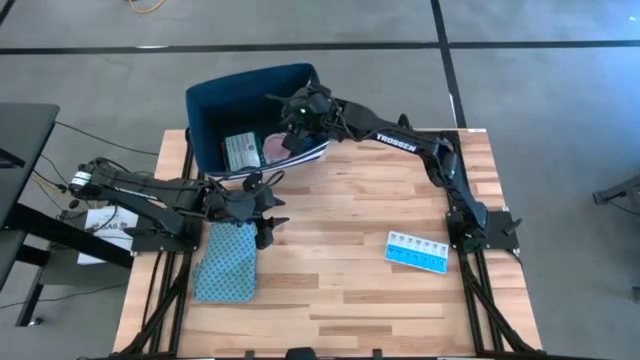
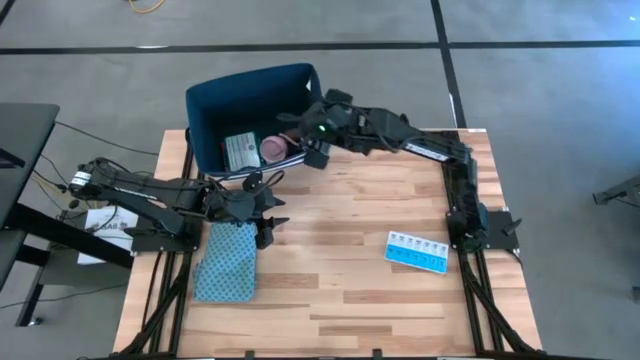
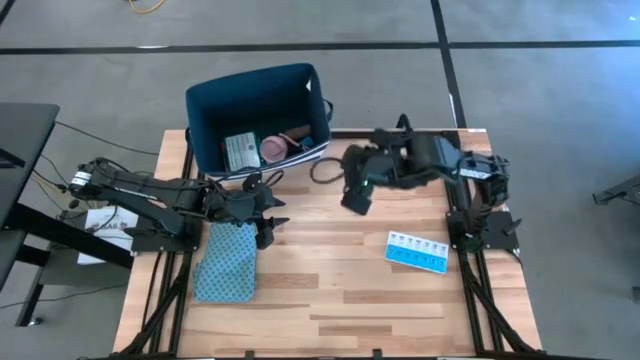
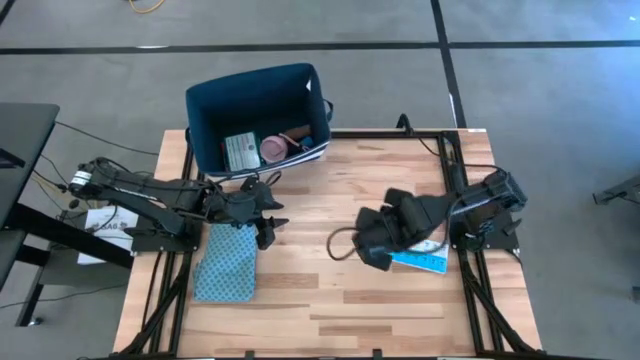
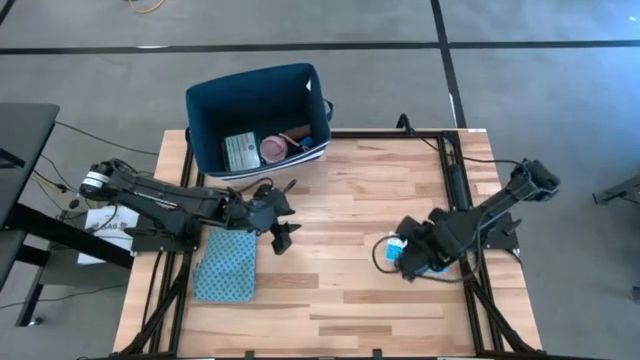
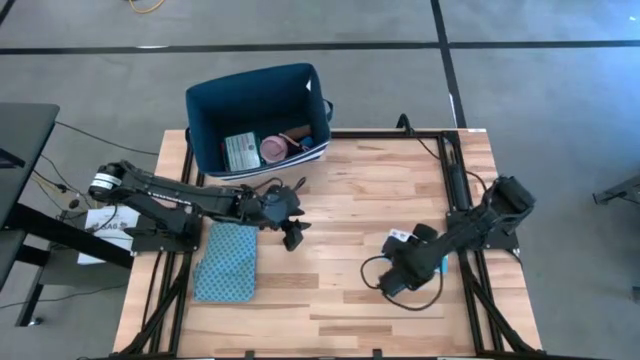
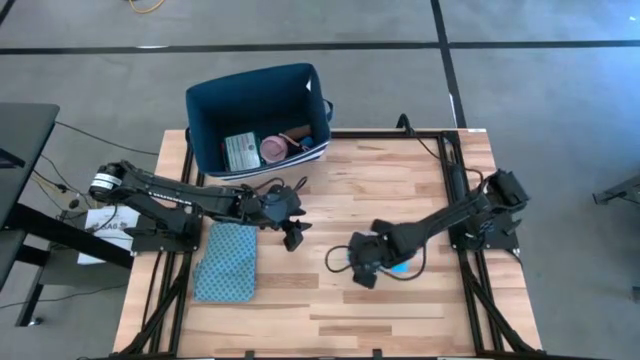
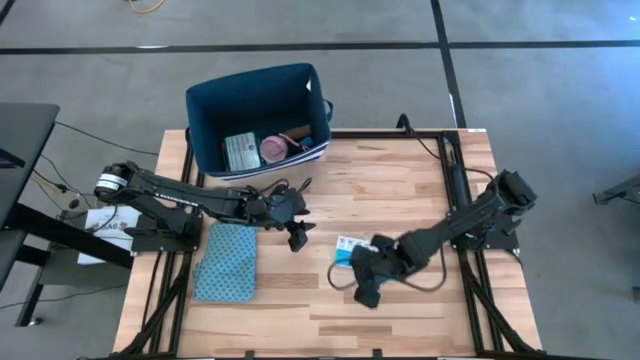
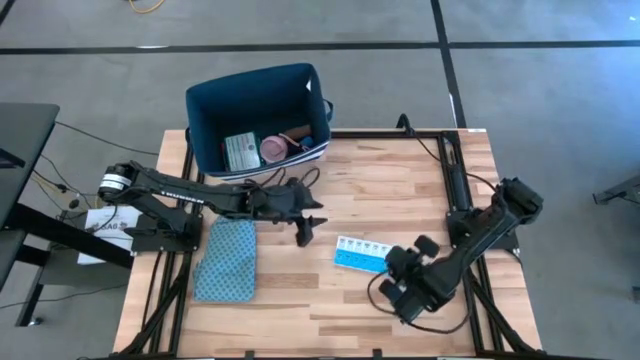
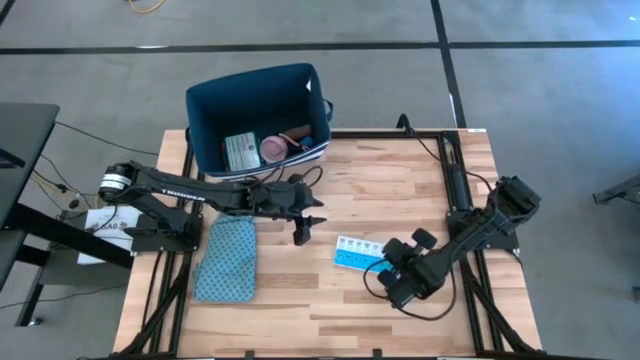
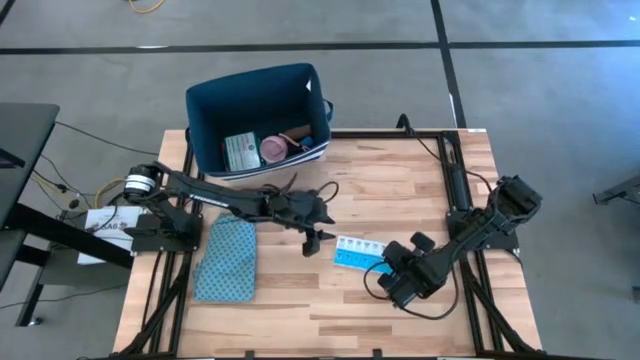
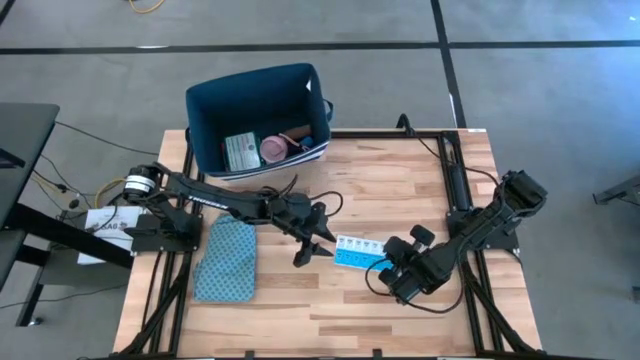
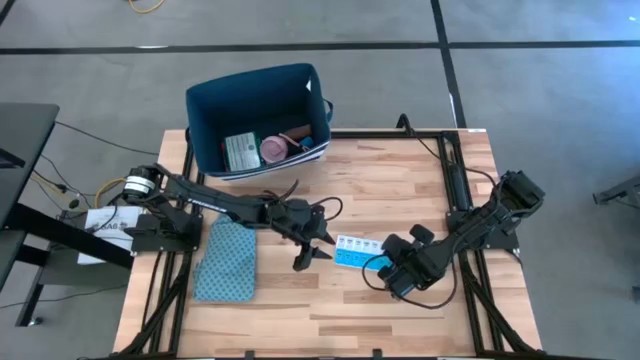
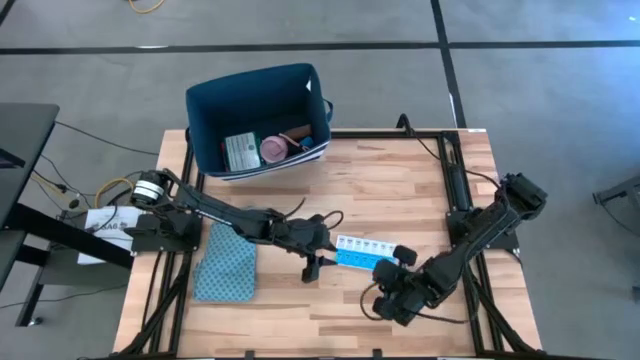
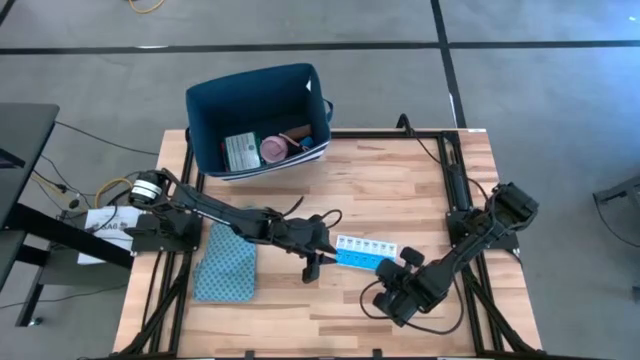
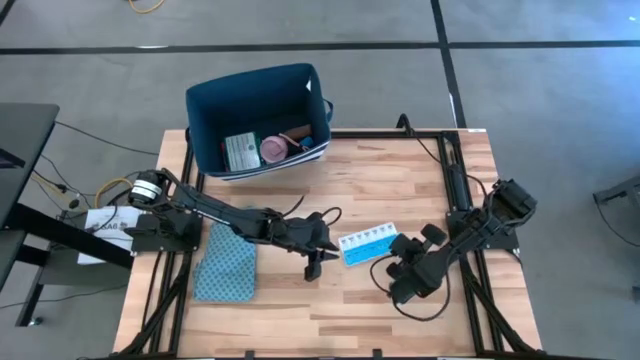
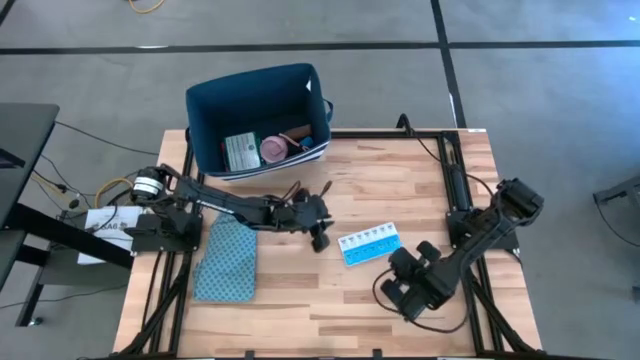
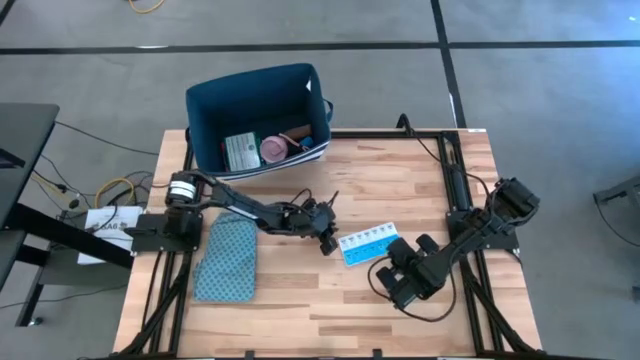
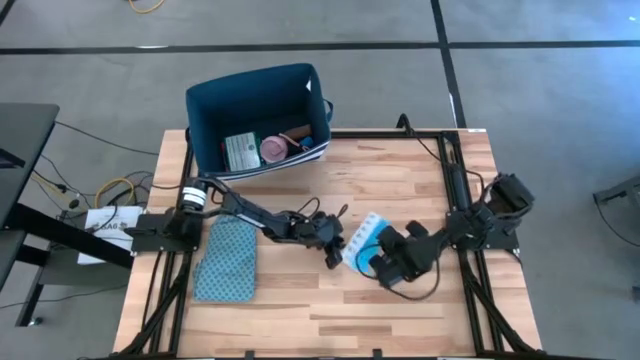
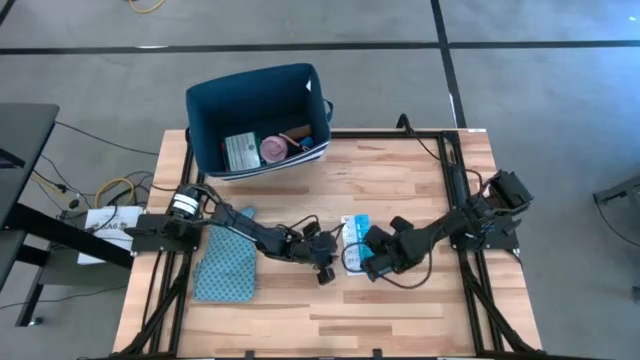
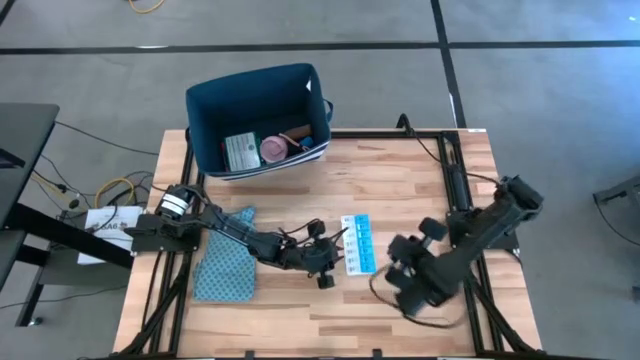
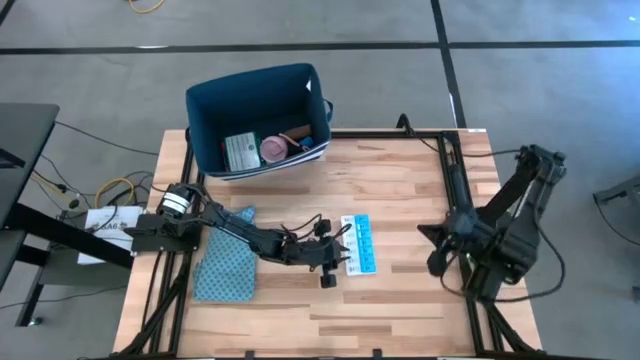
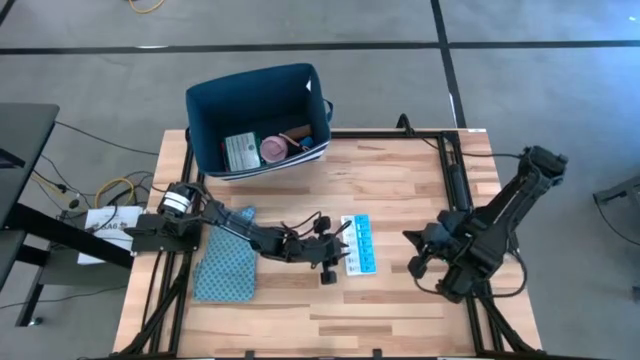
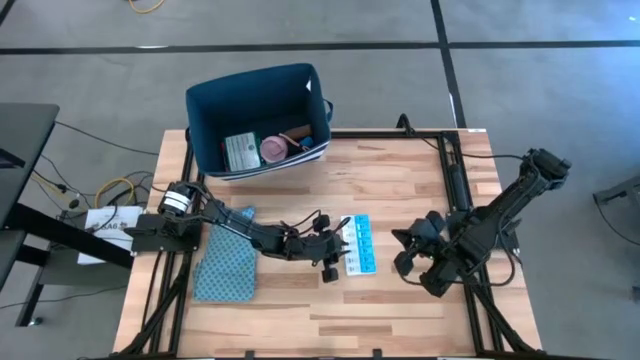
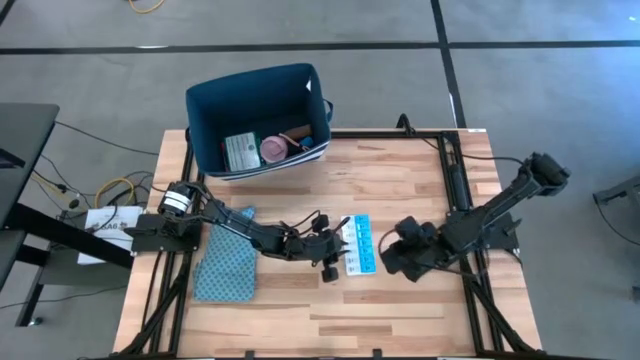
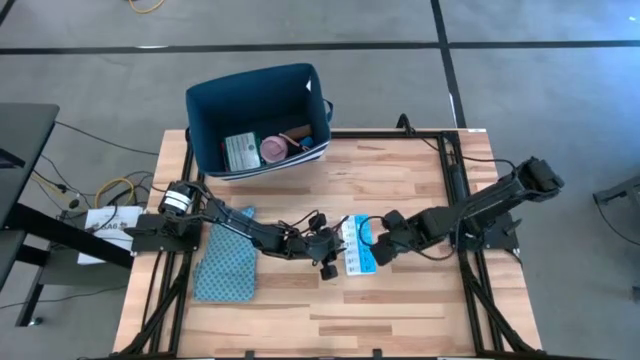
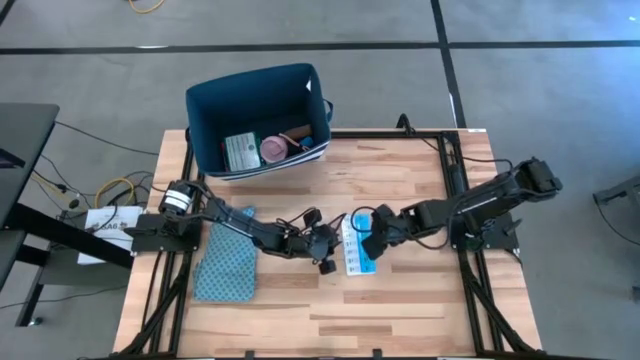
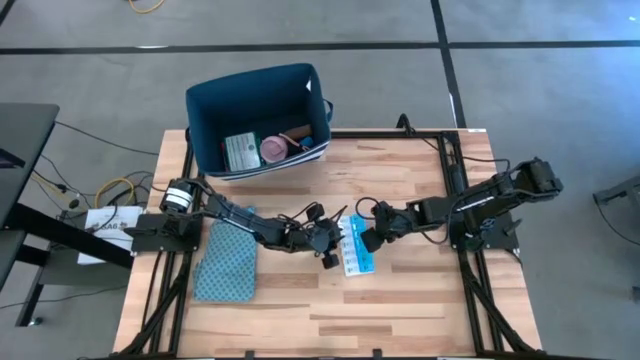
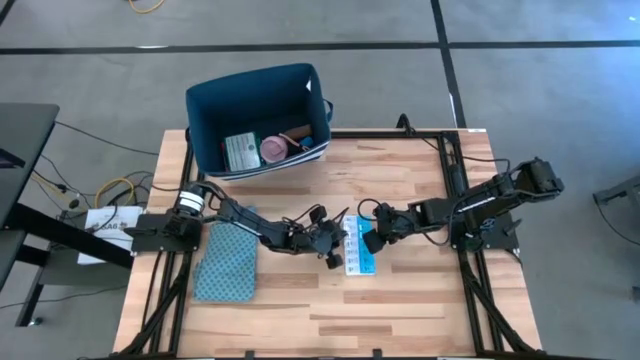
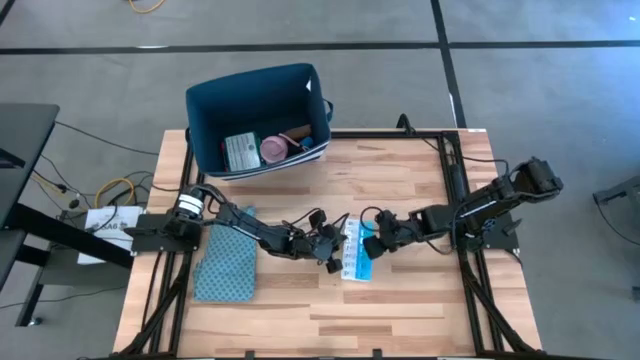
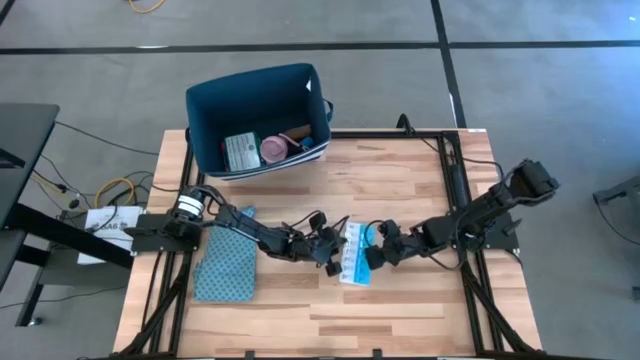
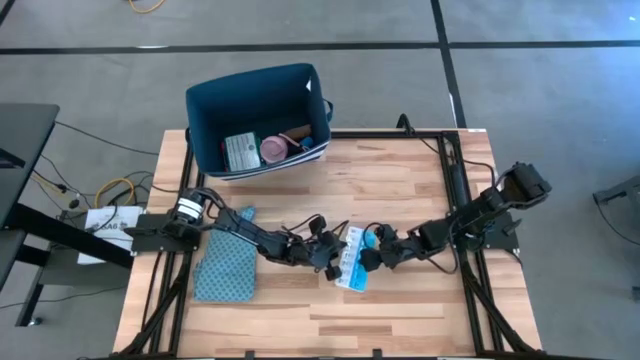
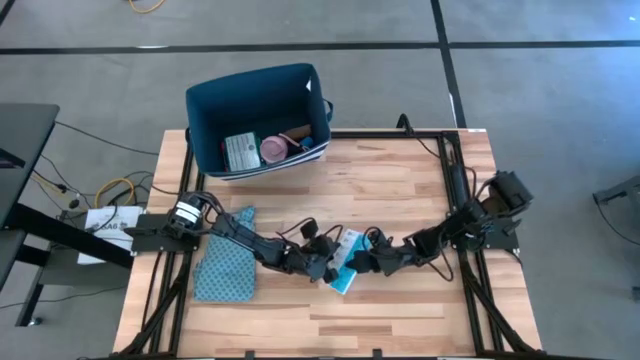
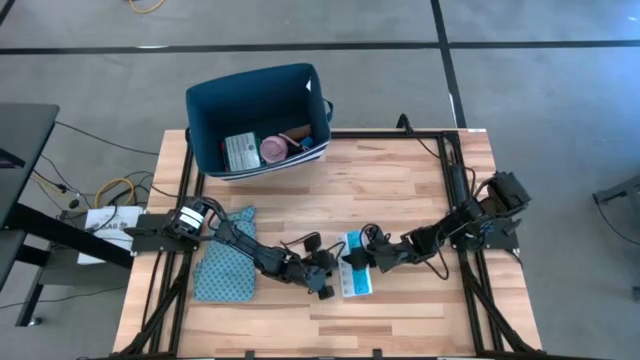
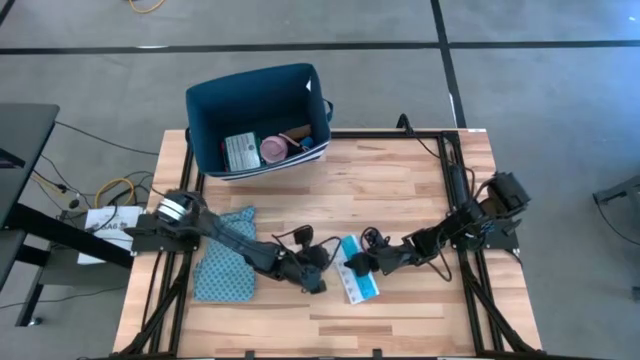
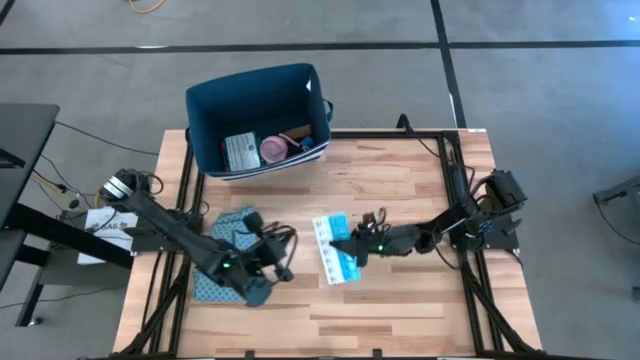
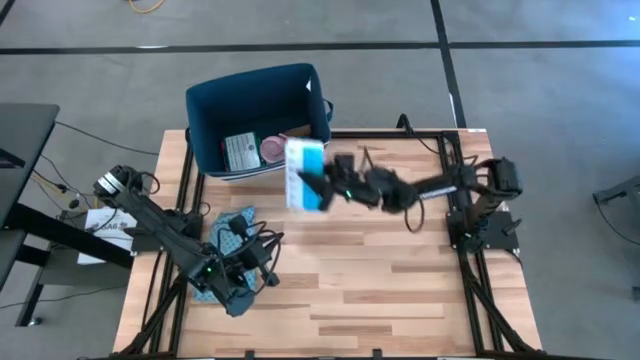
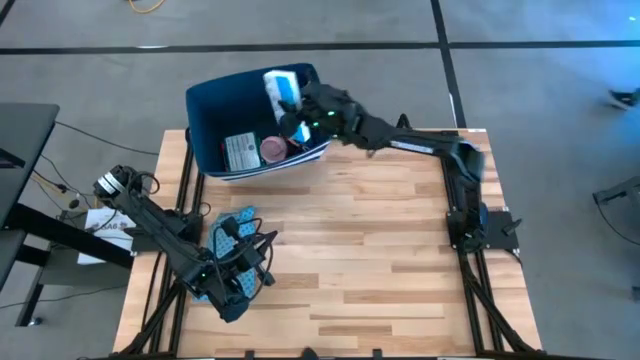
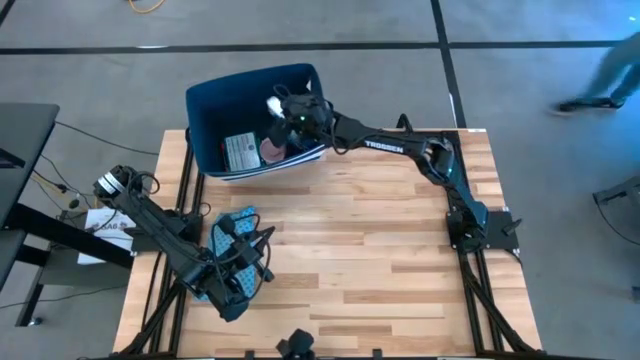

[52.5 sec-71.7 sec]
Task: Pick & place medical supplies in basket/bin
Put the pill organizer into the blue bin

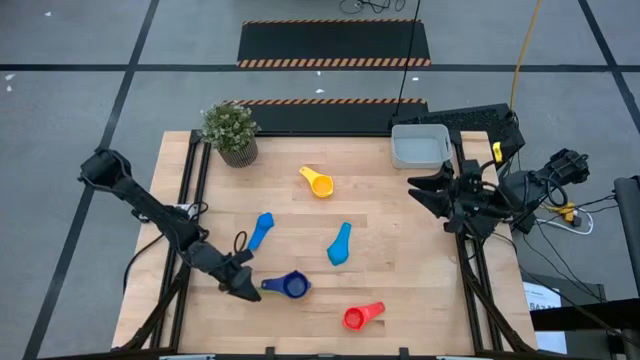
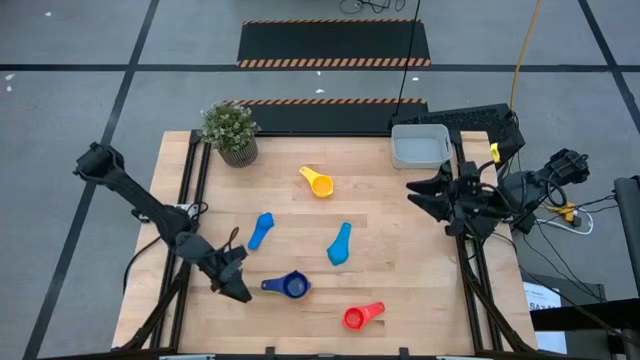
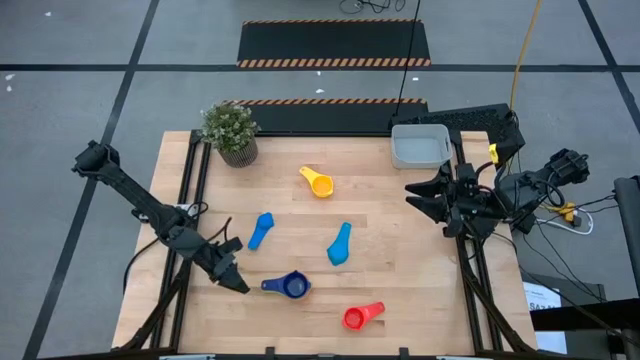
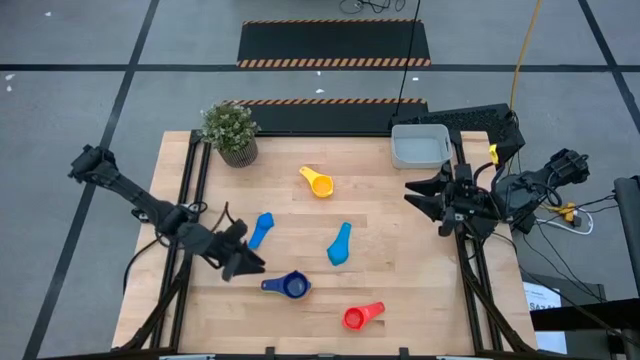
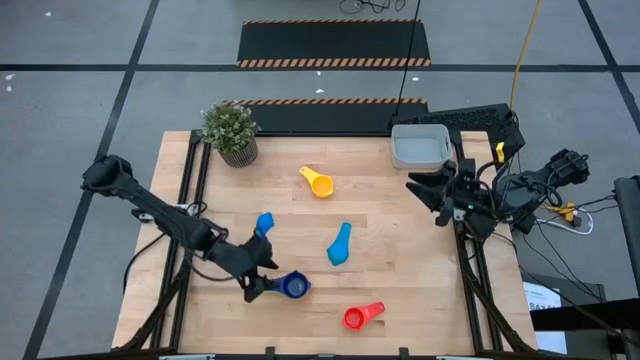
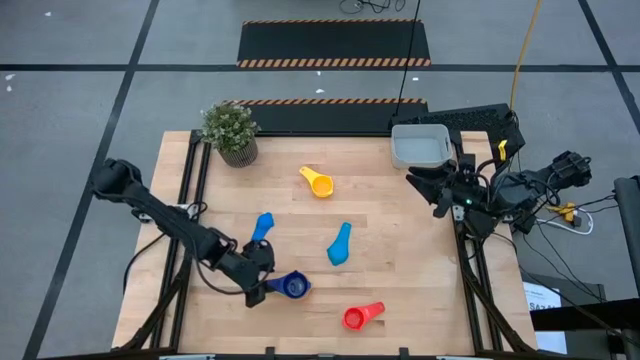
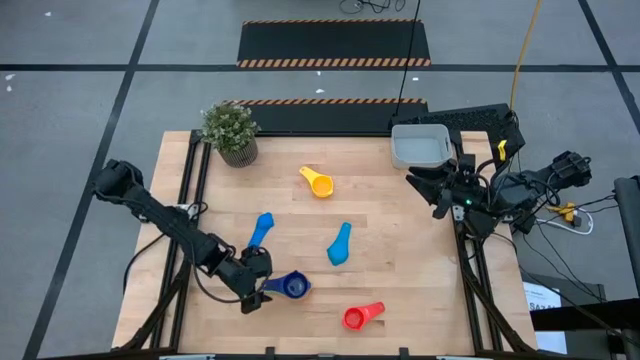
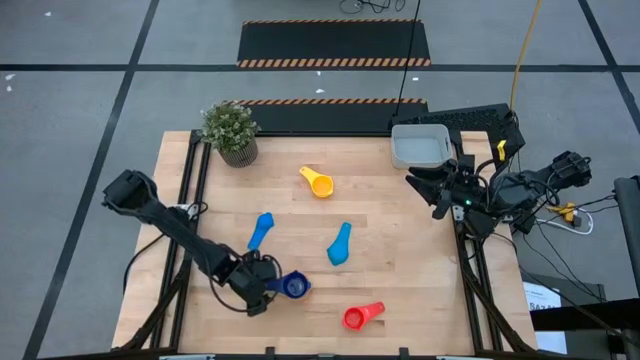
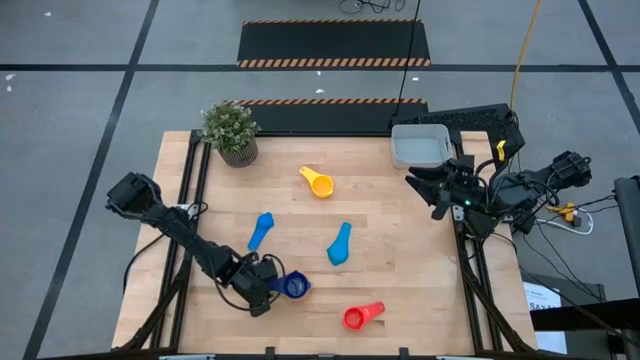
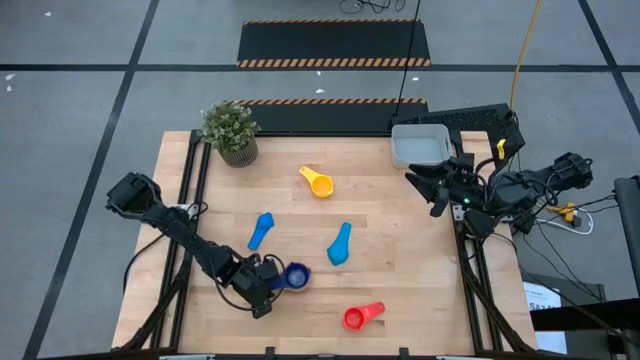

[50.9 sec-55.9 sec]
Task: Nest measuring cups in basket
Adjust the stacked measuring cup on the table
